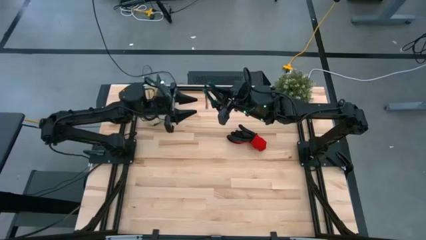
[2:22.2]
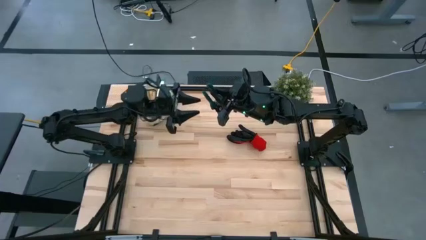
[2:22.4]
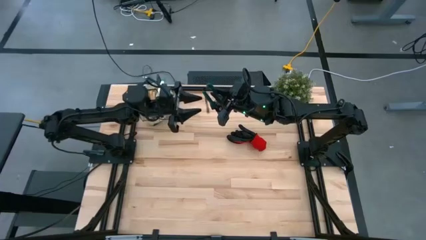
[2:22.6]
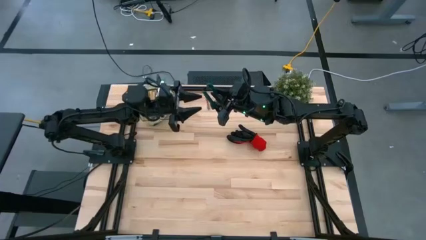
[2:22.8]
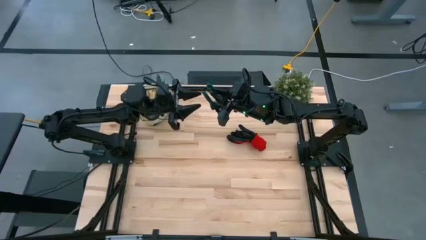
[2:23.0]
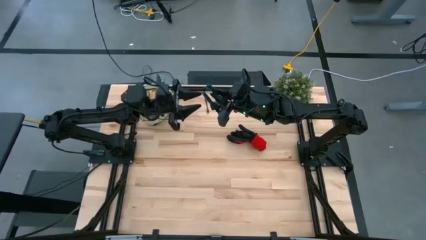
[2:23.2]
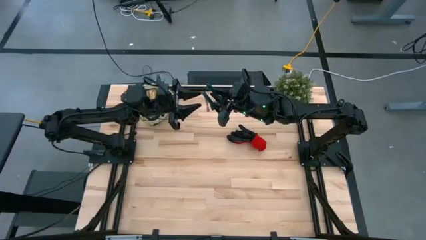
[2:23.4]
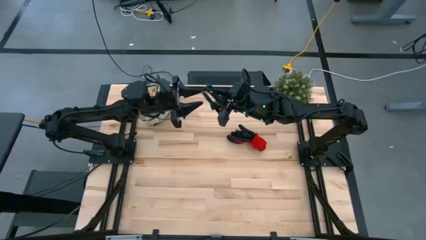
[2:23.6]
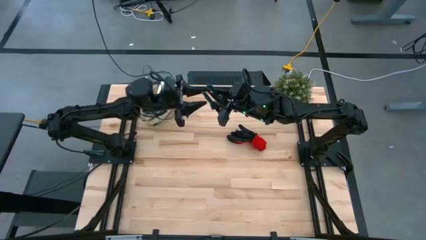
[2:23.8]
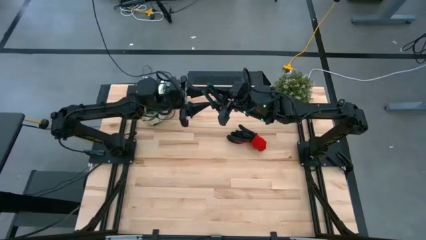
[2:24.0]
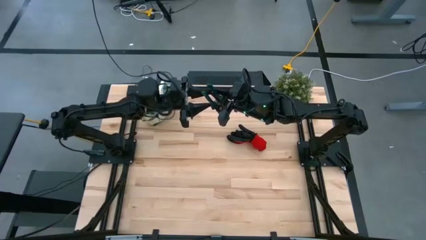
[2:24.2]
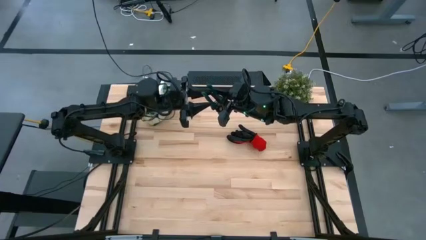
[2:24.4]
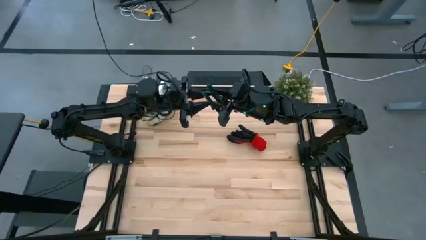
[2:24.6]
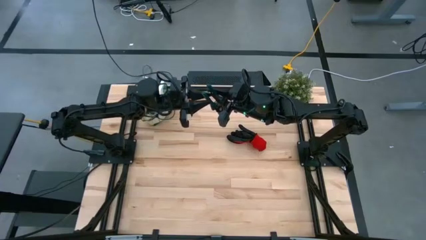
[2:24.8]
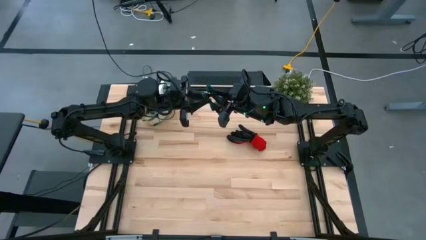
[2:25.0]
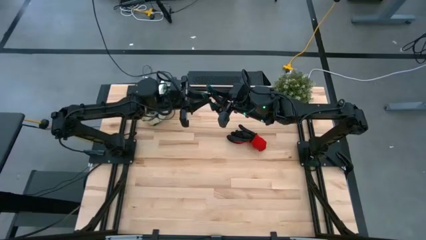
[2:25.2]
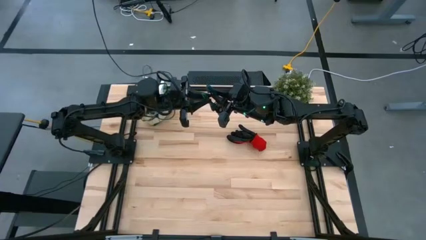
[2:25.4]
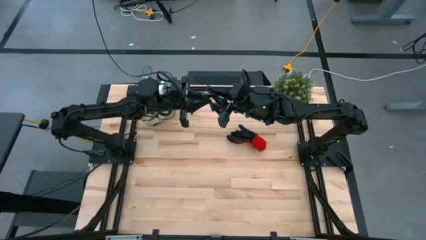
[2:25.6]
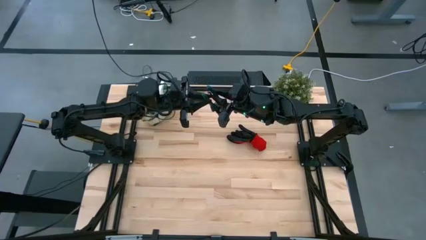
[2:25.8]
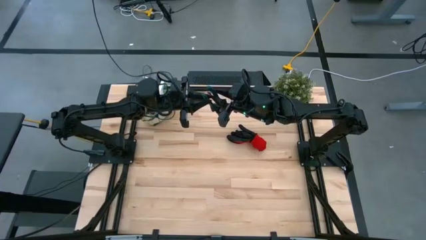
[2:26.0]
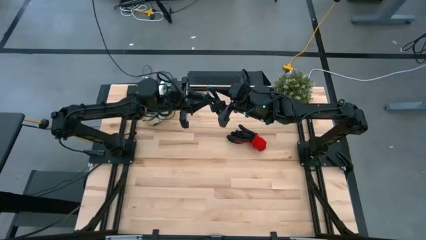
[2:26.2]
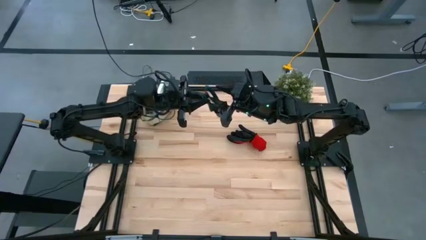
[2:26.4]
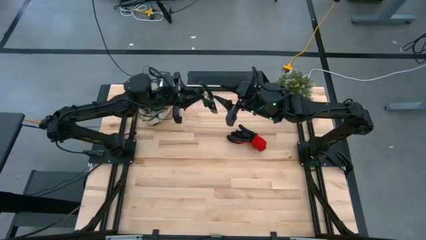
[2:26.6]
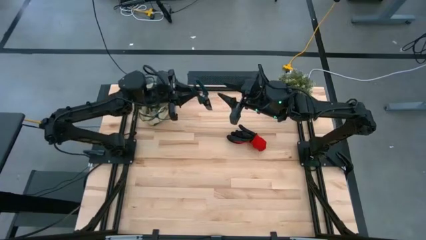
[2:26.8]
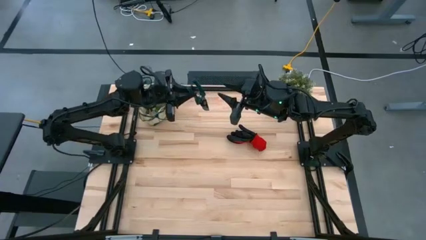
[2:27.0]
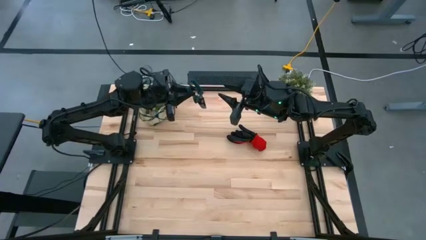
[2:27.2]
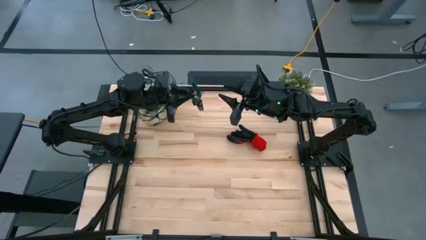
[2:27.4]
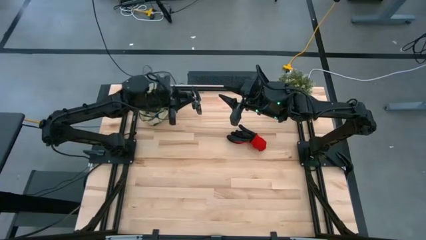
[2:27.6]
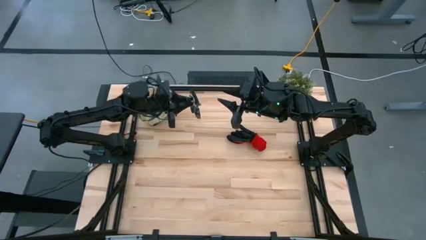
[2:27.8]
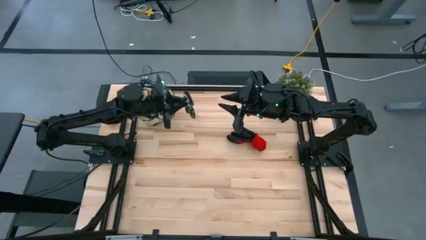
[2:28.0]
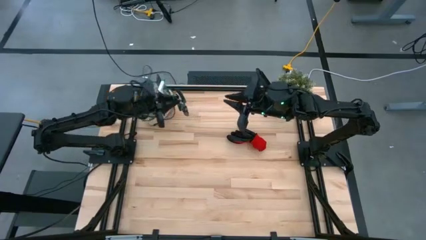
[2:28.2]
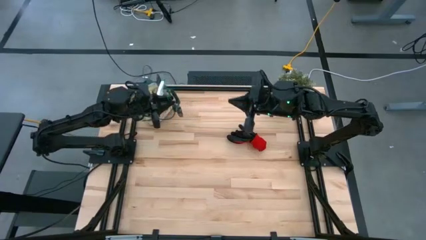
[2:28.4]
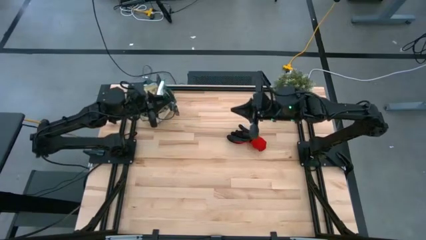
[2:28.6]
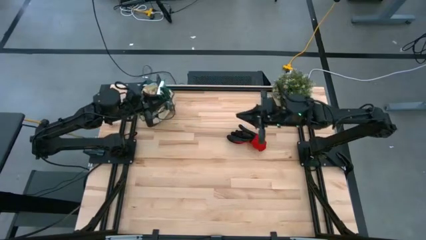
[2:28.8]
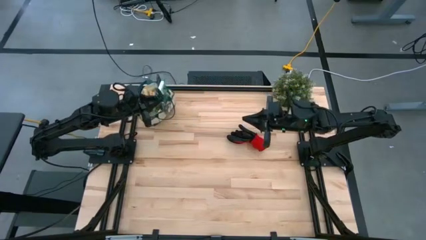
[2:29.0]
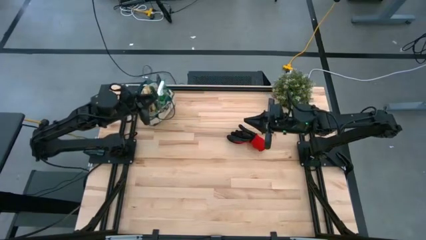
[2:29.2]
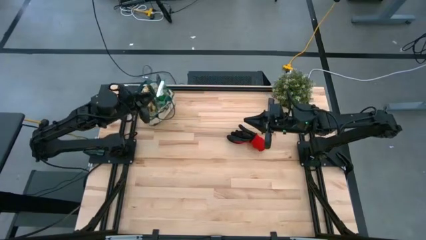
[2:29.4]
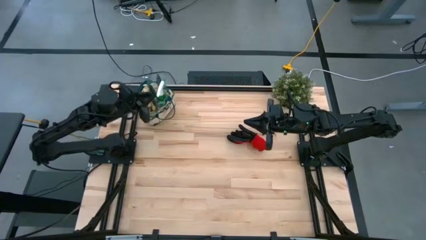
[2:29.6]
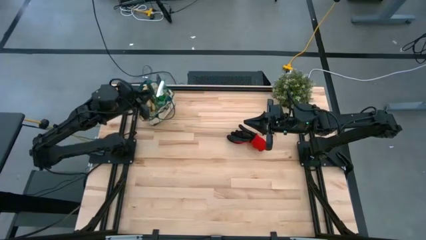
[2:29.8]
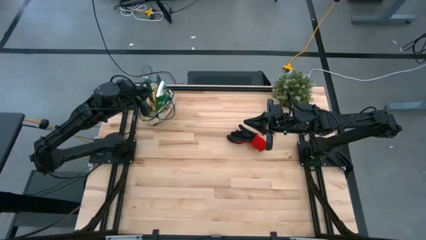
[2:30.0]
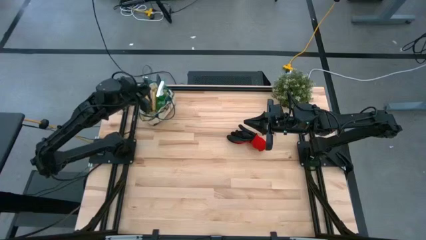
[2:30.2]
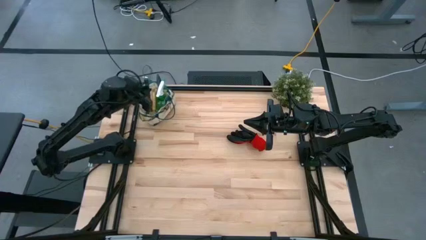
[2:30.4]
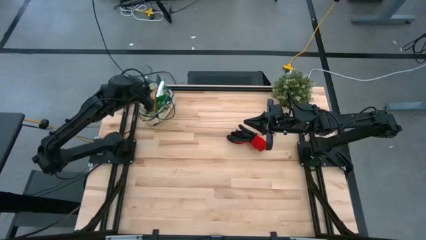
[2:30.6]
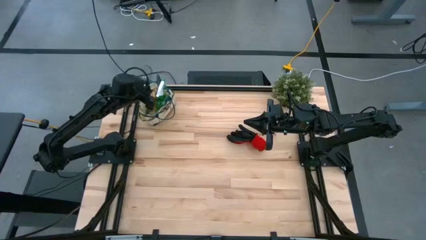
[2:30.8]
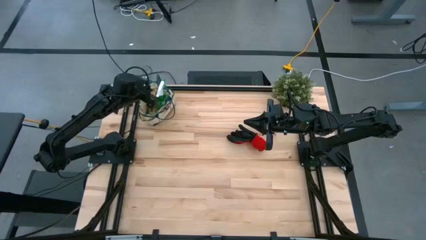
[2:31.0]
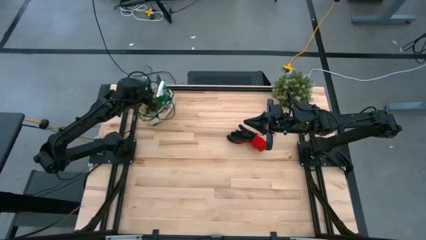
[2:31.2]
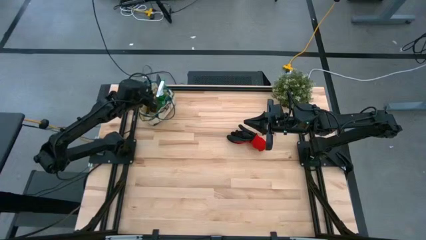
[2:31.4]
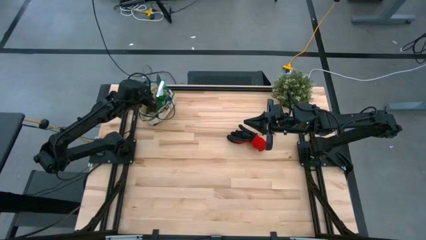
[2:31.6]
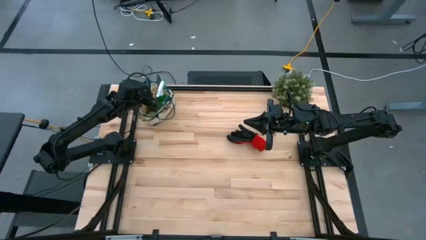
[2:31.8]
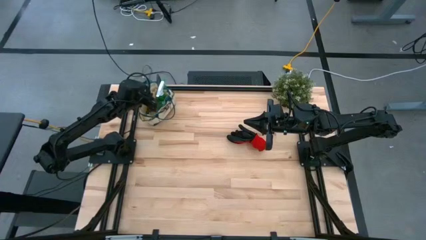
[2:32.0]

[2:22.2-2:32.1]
Task: Pick & Place Garden tools in Gardening bag
Put the green pruning shear into the gardening bag

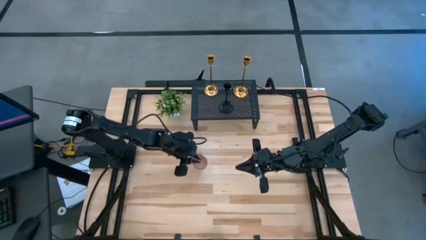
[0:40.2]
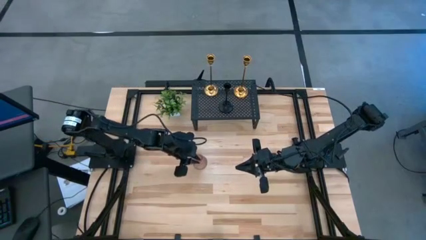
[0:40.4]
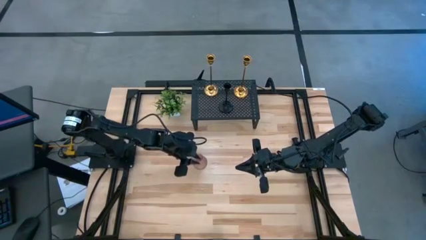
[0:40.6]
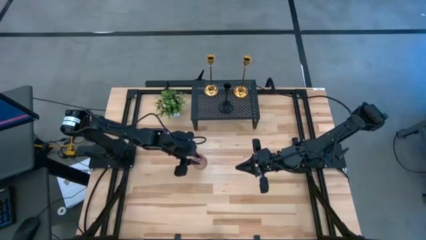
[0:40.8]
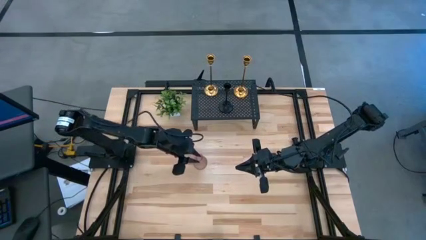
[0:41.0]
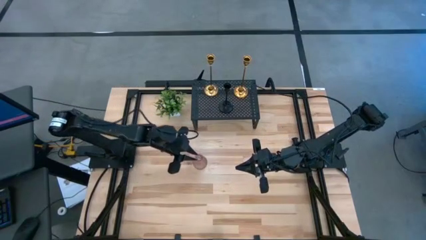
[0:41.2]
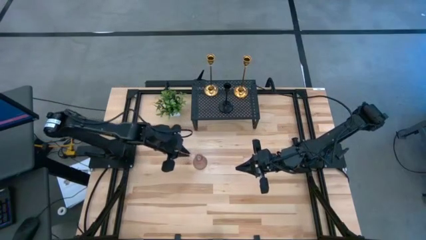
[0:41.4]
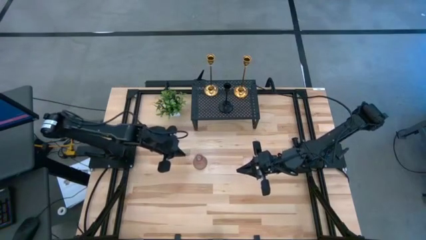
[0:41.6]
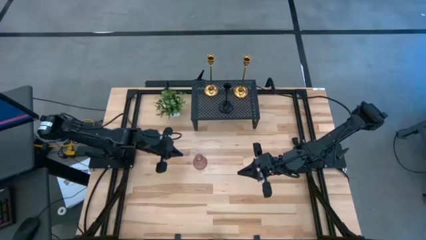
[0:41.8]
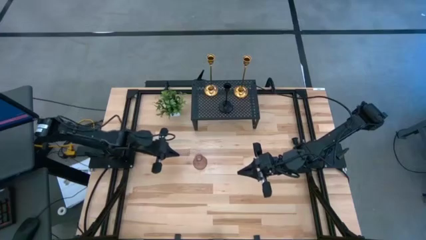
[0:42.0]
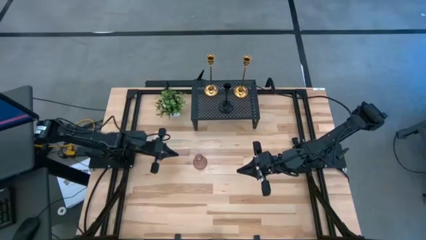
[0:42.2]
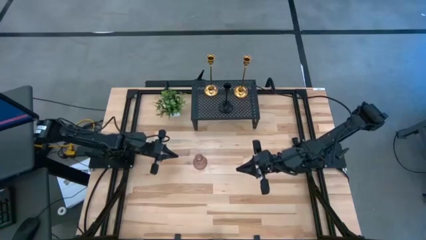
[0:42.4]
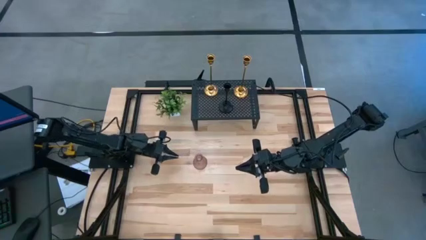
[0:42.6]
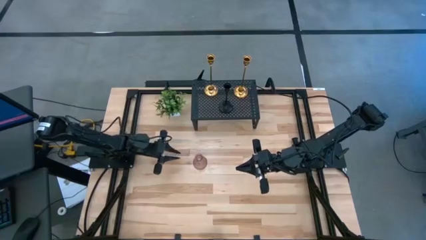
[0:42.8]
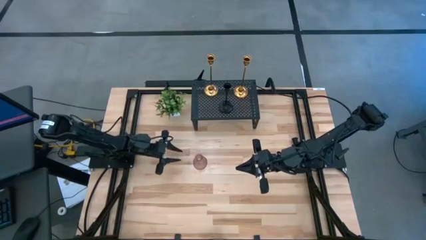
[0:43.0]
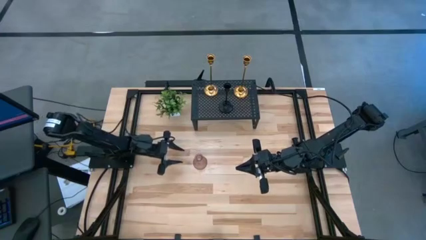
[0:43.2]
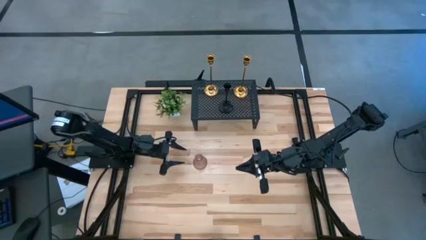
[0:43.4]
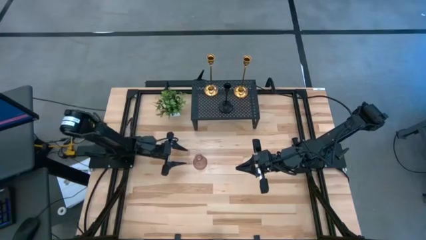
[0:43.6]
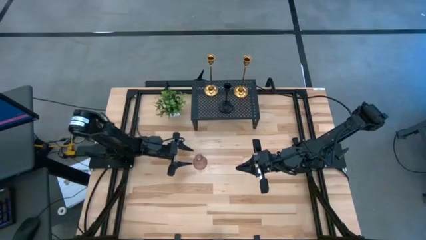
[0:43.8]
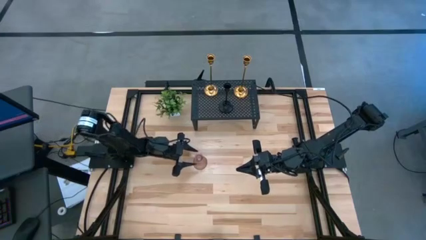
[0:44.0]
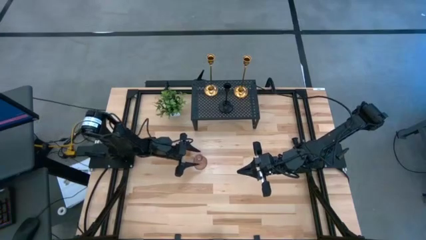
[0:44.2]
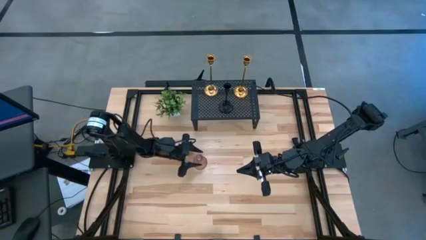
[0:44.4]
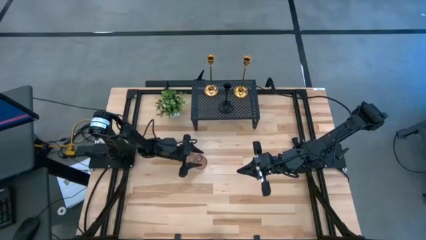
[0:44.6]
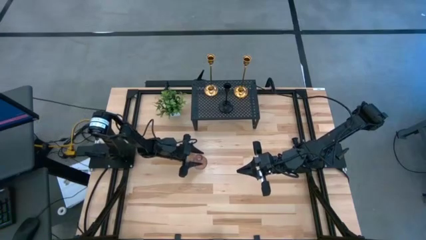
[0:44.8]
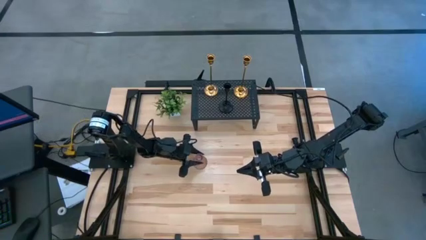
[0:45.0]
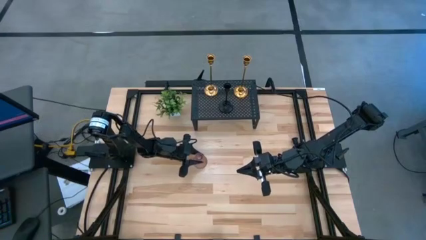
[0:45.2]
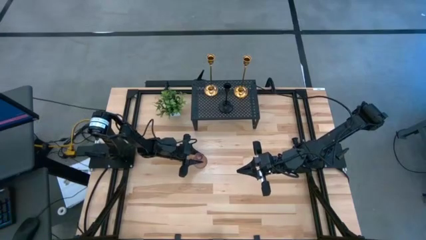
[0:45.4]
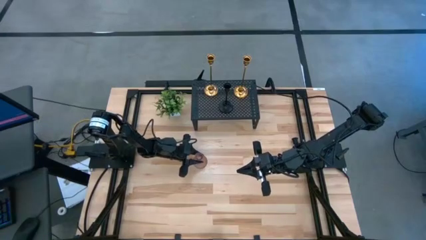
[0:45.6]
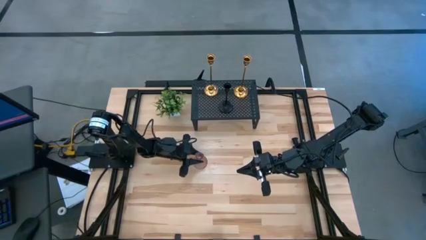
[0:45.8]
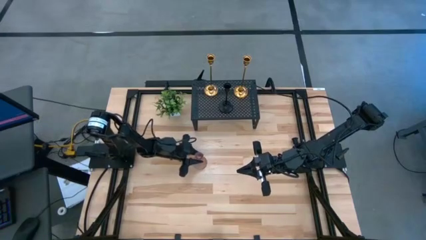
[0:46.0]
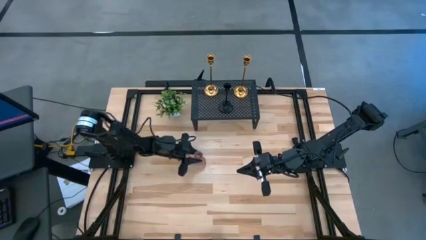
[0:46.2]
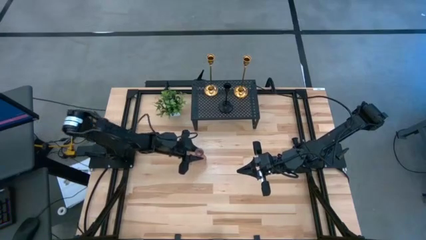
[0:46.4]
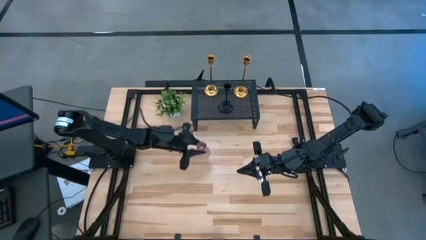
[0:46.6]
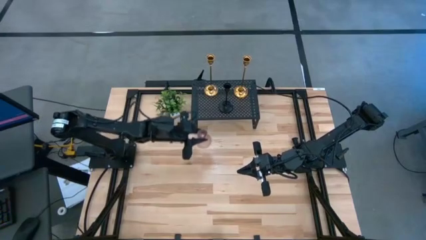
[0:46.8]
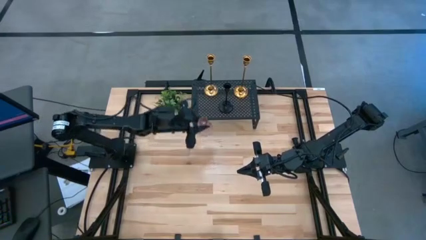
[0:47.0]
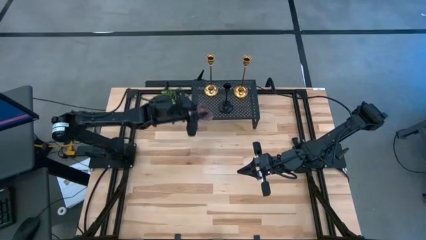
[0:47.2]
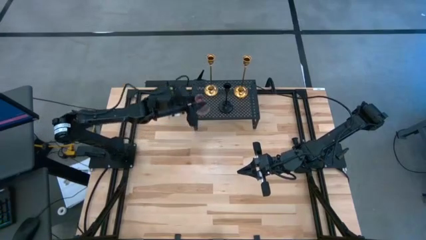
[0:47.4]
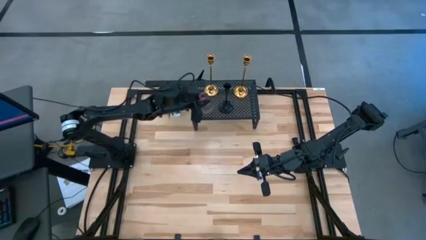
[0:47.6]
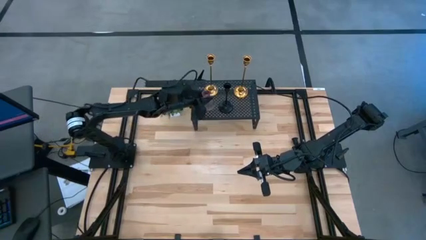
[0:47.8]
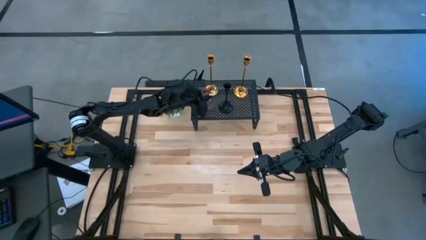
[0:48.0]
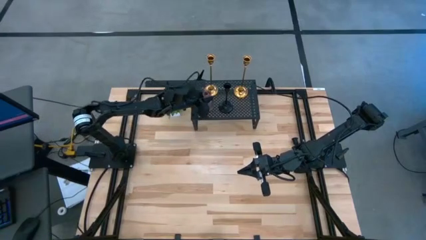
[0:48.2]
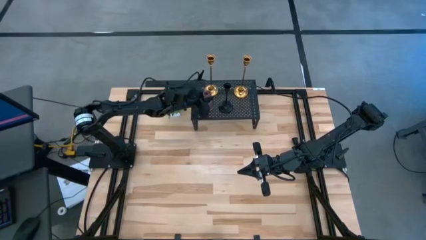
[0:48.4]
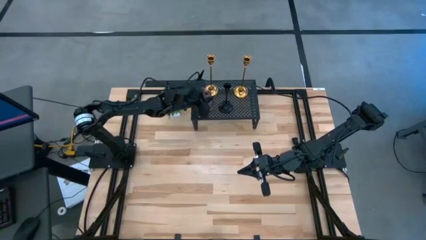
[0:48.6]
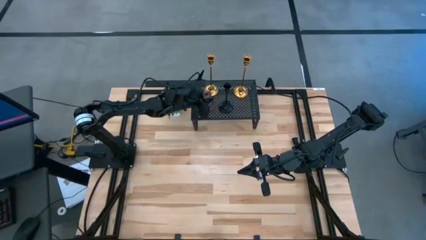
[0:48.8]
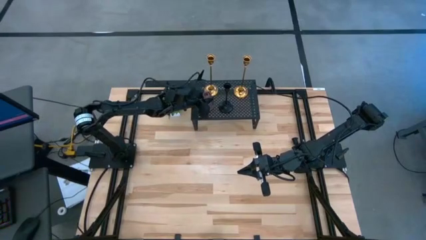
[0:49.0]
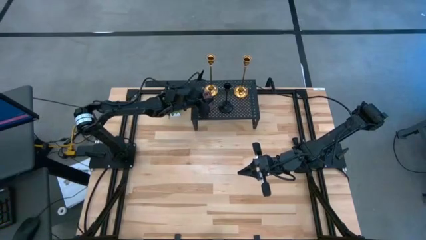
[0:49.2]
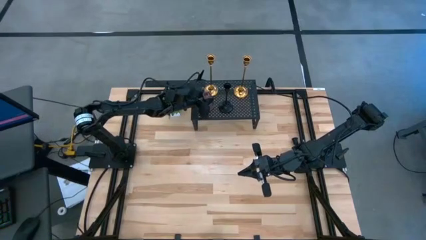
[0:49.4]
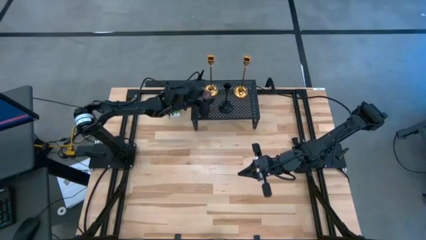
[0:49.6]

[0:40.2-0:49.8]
Task: Pick & Place candle stick holders
Put the pink glass candle holder on the shelf
